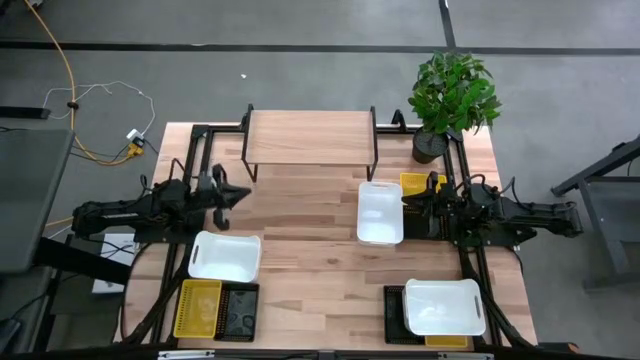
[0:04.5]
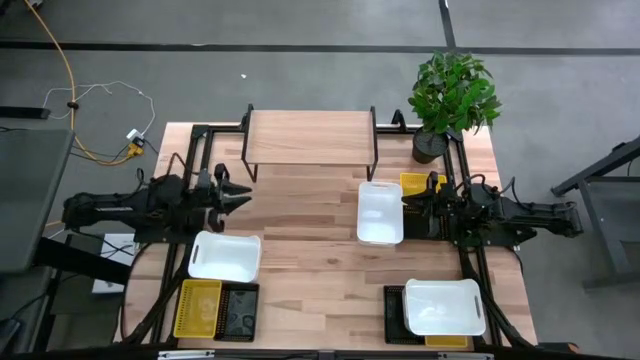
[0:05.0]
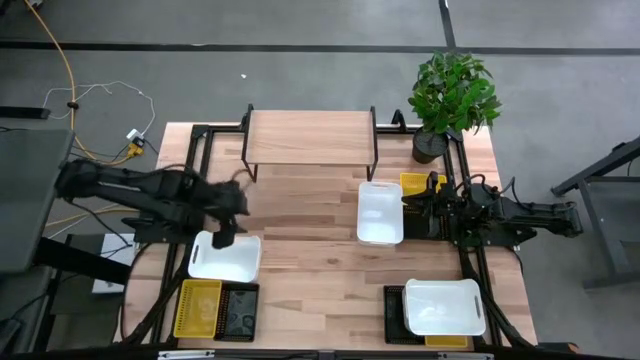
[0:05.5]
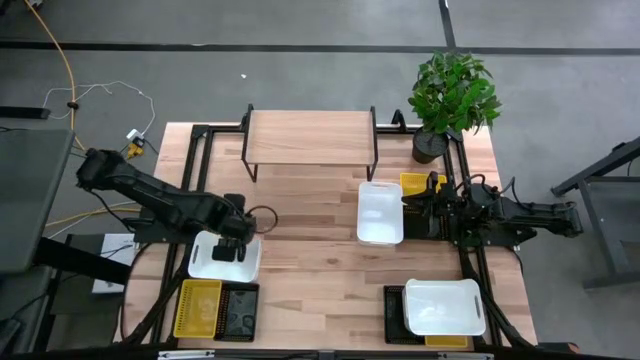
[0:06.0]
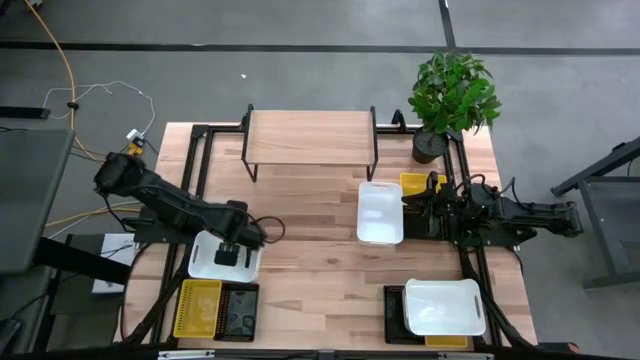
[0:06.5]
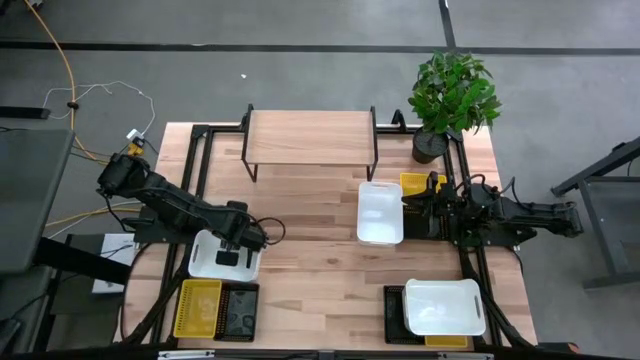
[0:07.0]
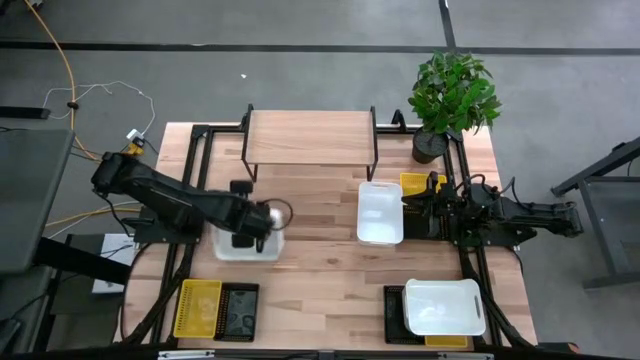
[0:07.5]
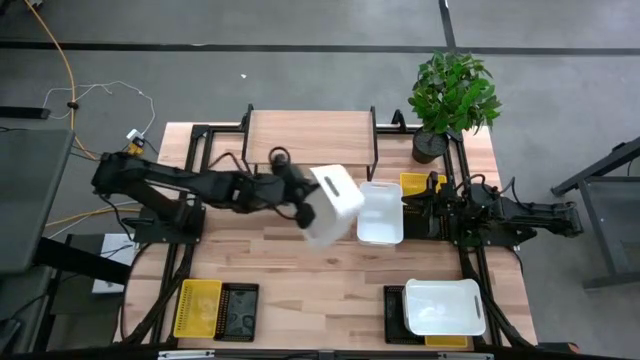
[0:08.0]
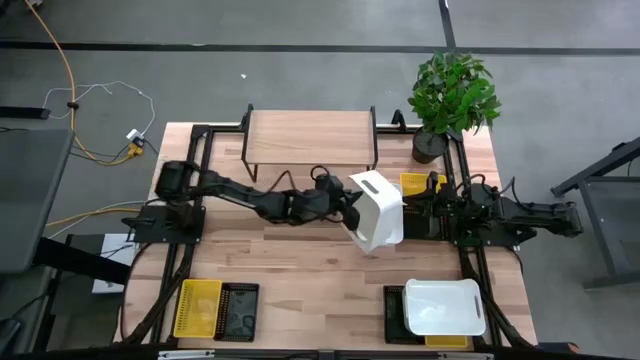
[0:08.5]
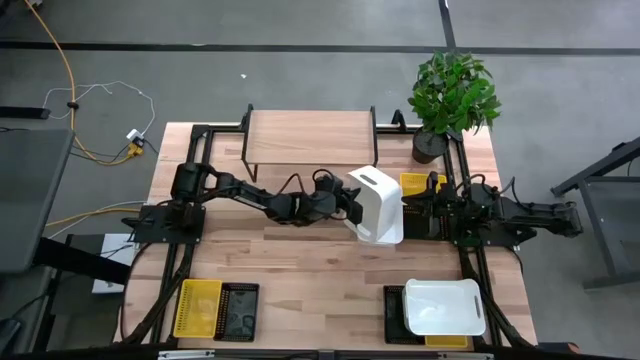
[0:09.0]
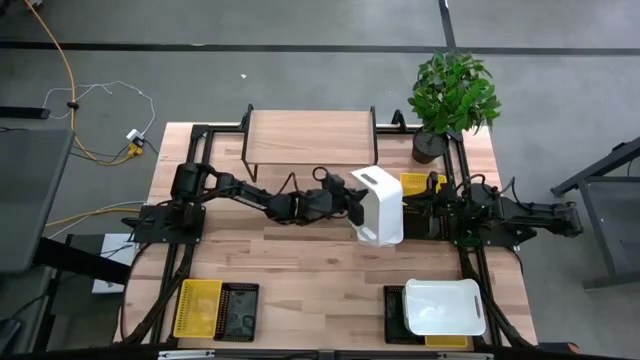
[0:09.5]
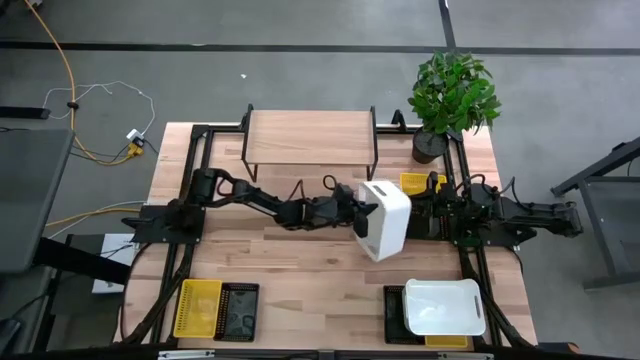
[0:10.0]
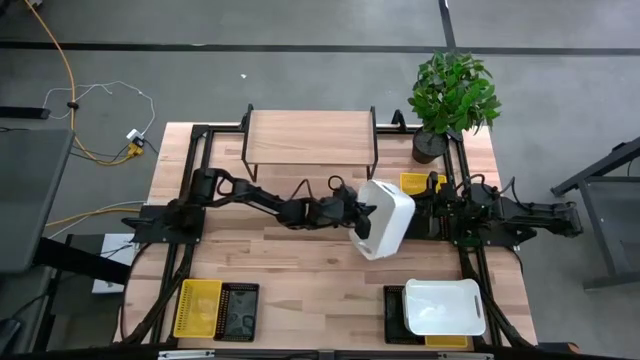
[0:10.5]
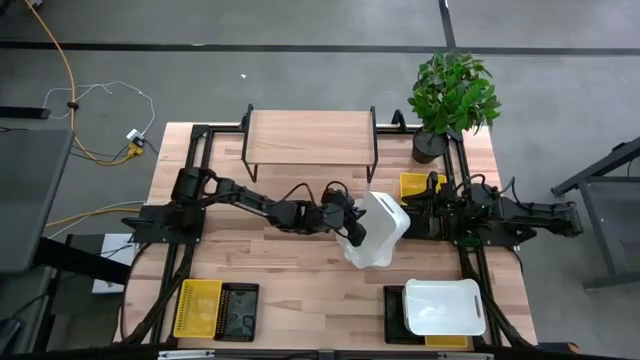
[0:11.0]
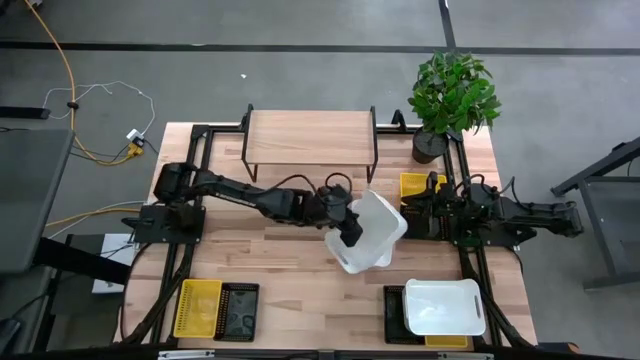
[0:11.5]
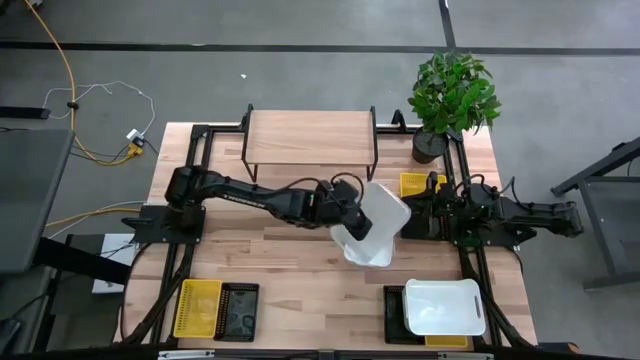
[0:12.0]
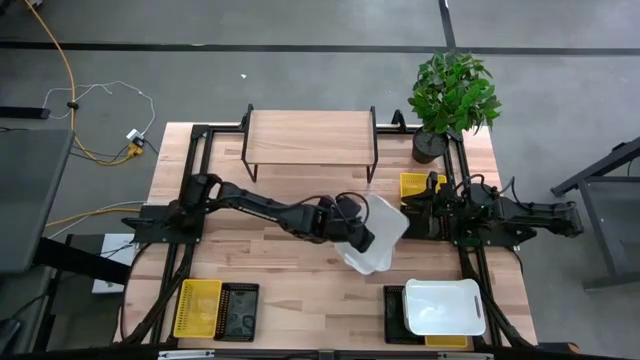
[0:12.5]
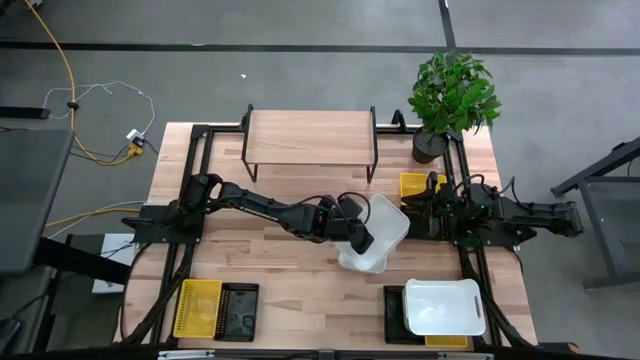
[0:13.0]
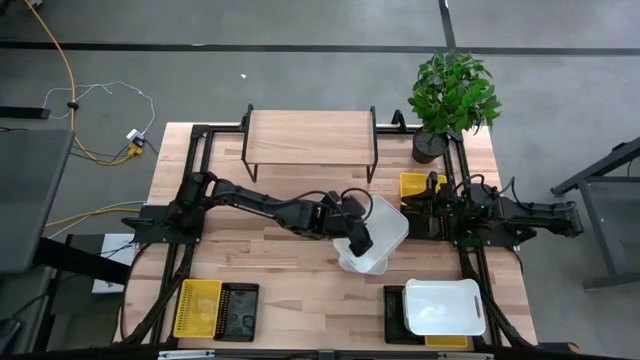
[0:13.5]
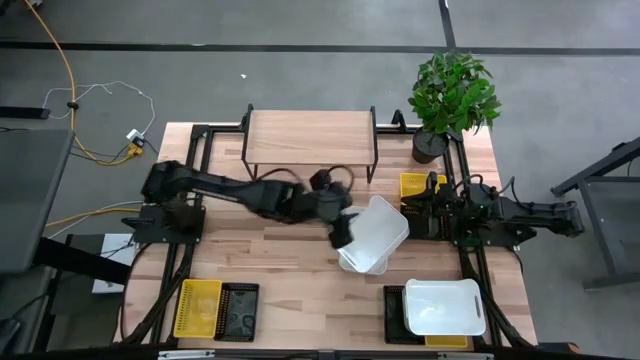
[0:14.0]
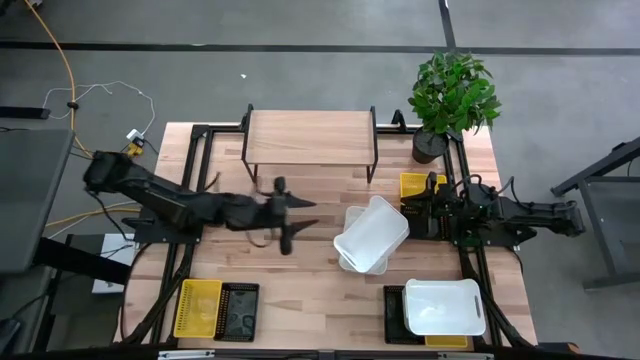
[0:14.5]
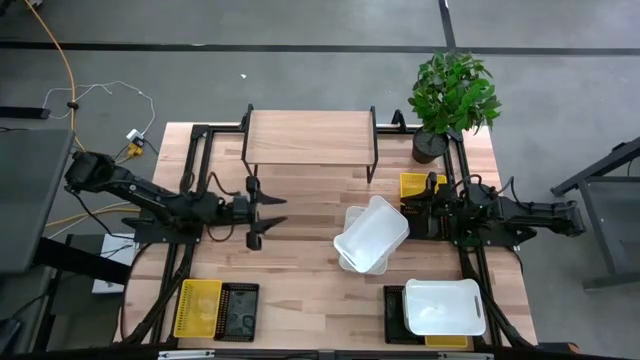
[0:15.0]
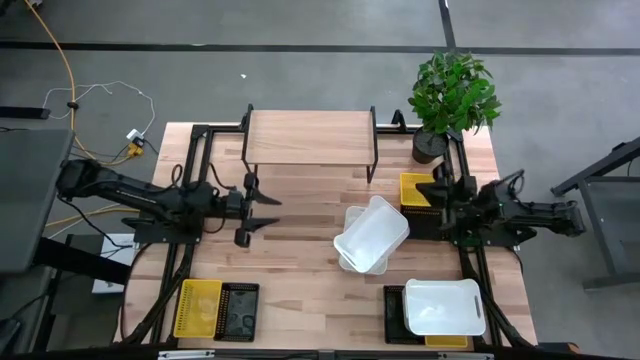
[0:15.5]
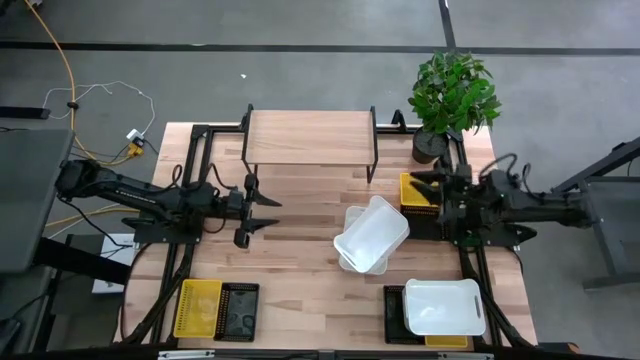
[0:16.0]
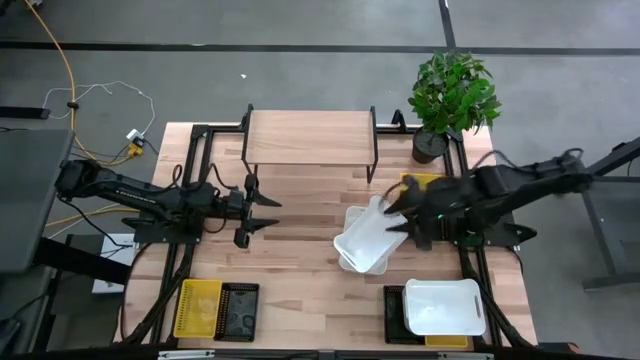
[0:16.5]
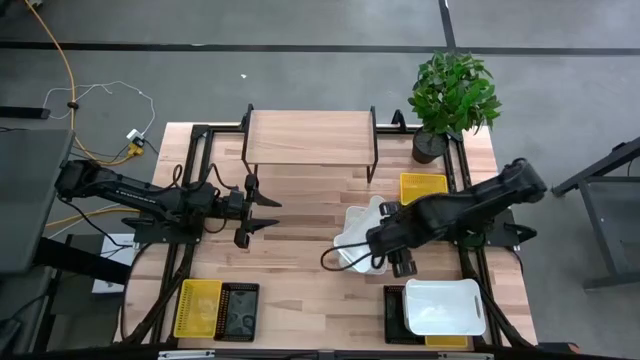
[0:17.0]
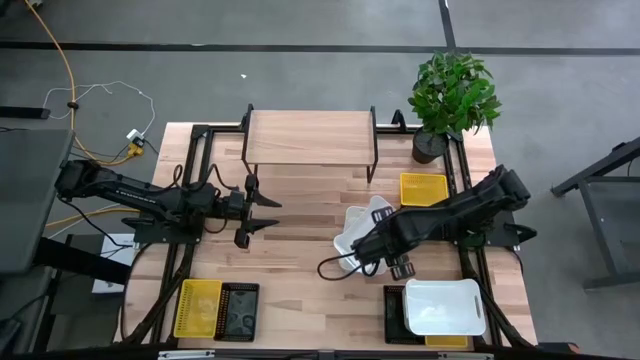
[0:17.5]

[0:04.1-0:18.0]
Task: Stack baskets on shelf by color
Stack the top left white bin on the top right white bin

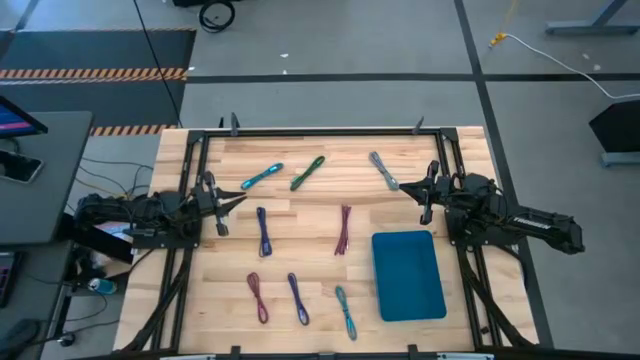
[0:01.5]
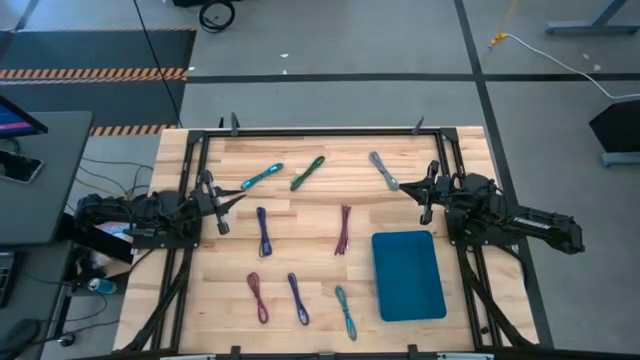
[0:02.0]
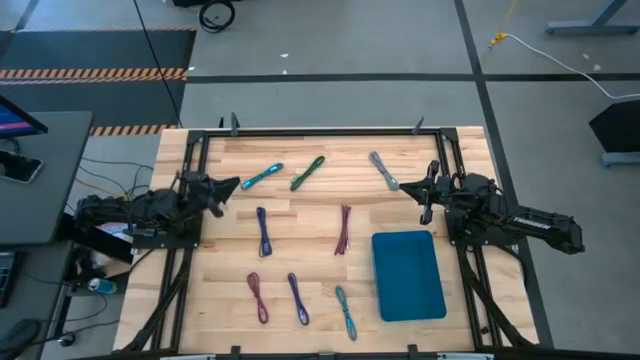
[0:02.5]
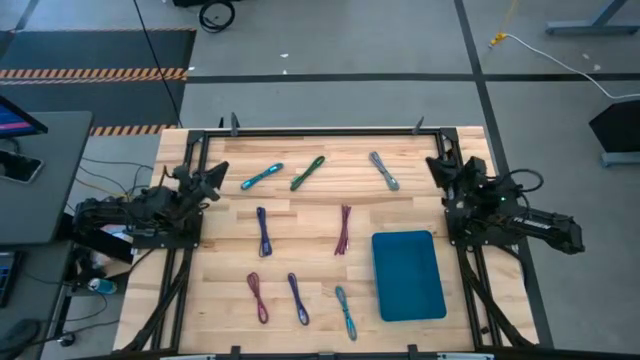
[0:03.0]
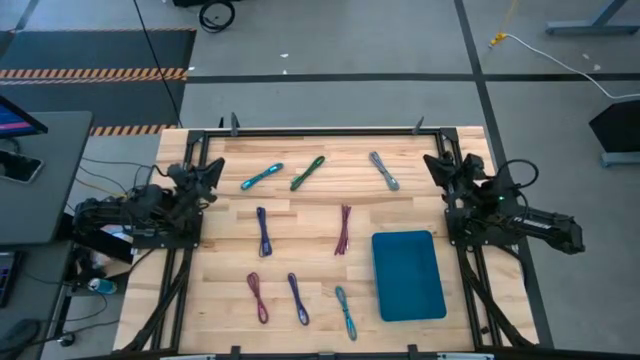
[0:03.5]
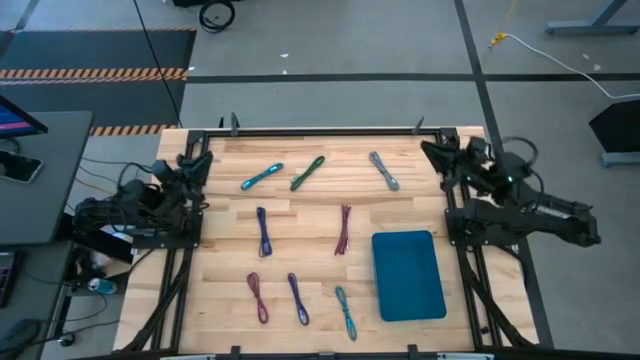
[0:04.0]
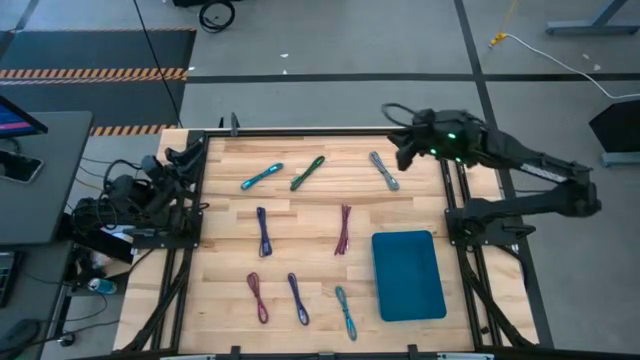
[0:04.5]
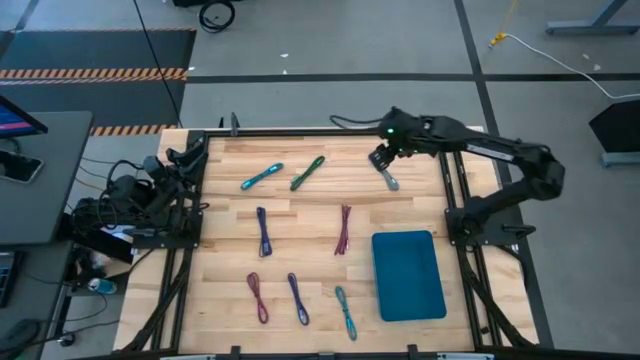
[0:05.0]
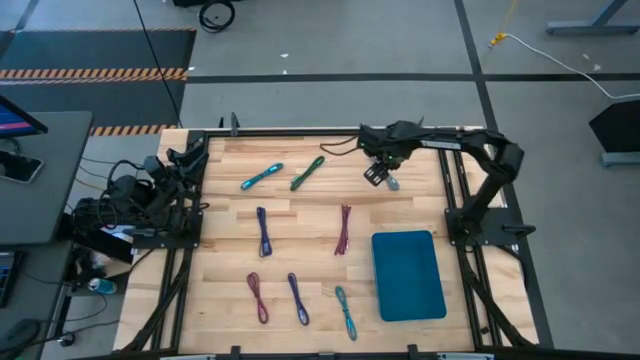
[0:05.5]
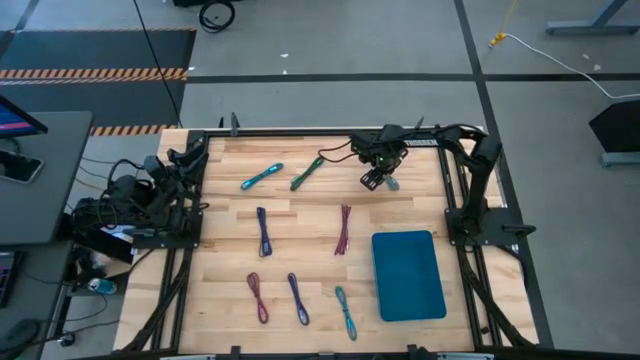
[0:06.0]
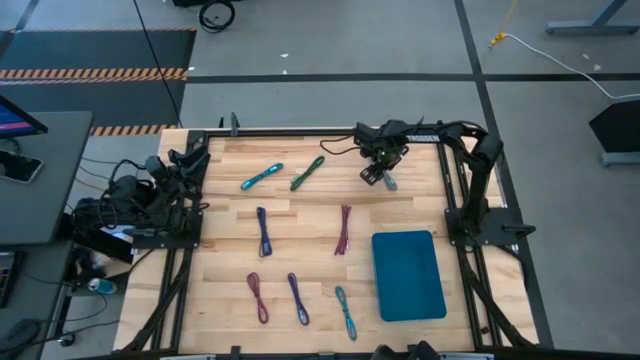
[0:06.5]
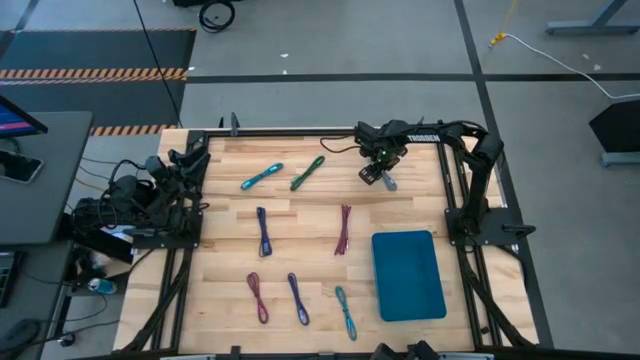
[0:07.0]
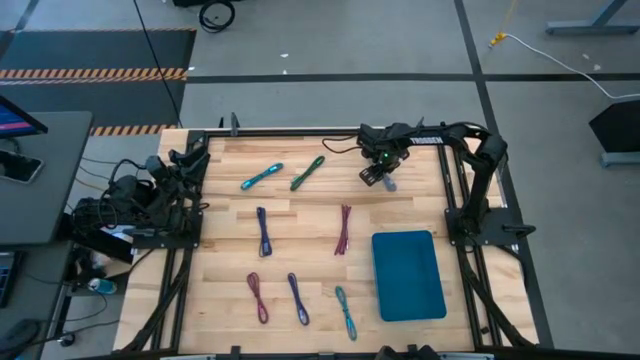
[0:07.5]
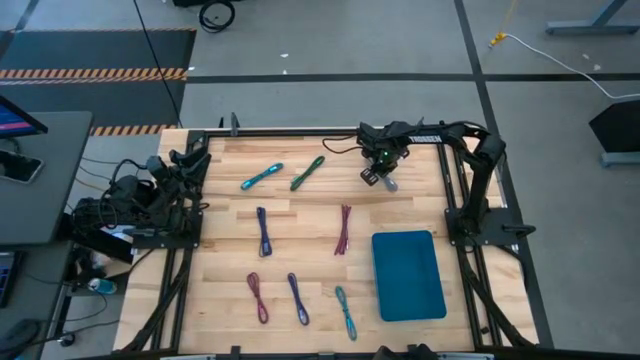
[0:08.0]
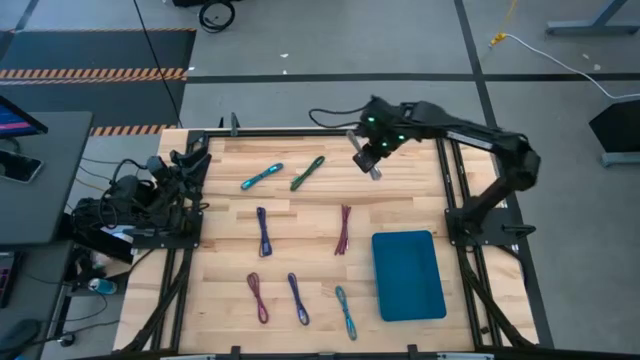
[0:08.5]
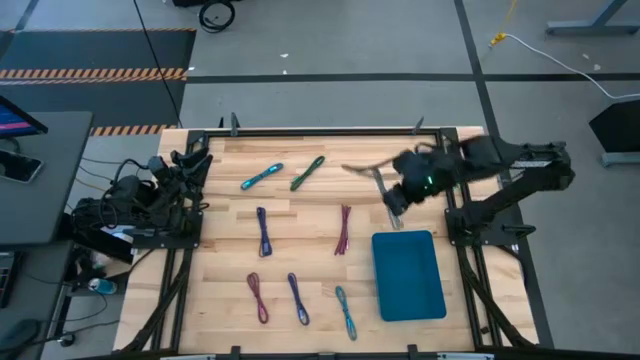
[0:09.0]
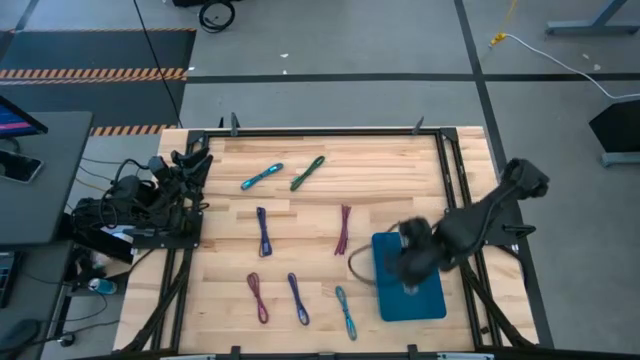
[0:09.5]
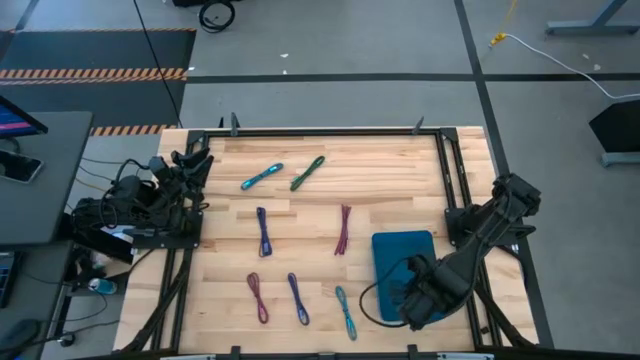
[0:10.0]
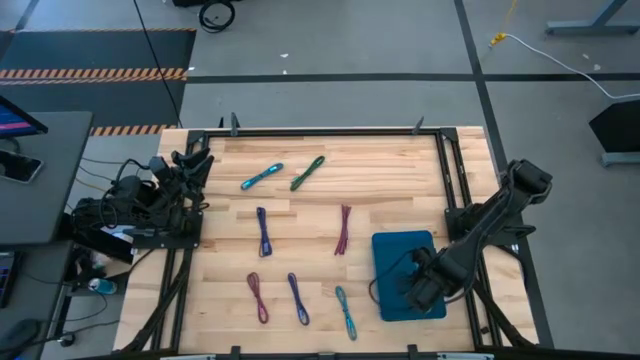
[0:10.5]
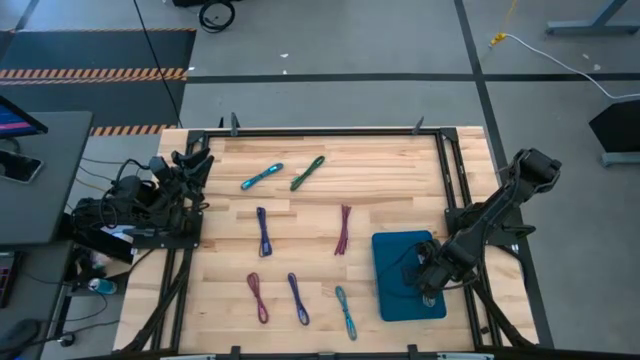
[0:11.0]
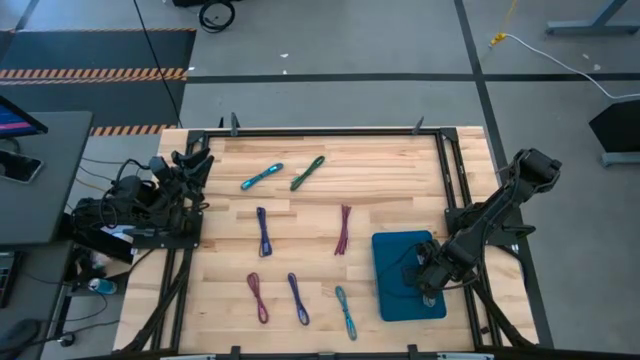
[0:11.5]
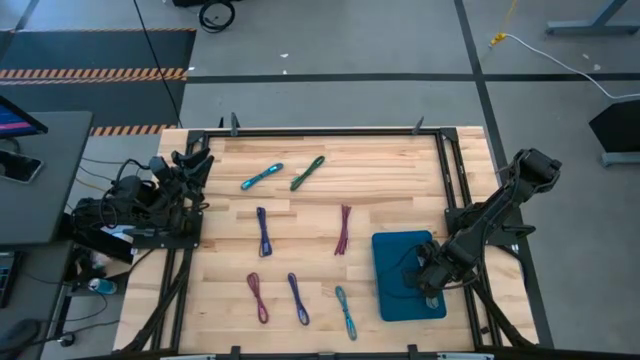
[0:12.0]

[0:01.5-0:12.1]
Task: Pick and place USB-C Cables
Put the white charger cable into the blue bin
